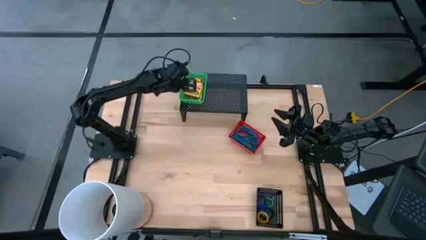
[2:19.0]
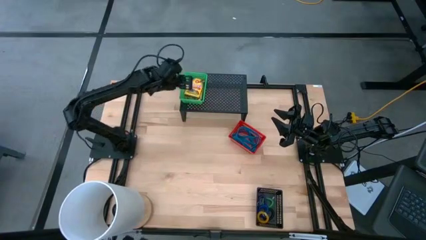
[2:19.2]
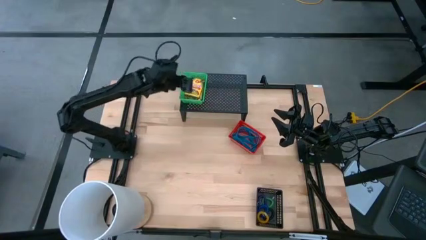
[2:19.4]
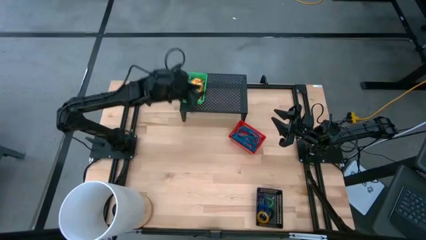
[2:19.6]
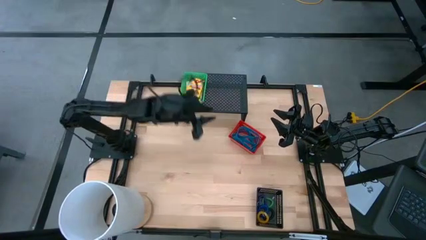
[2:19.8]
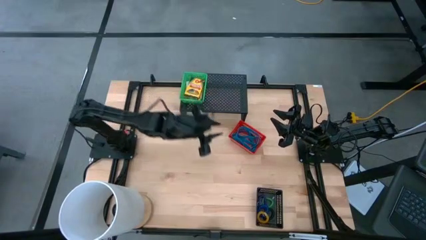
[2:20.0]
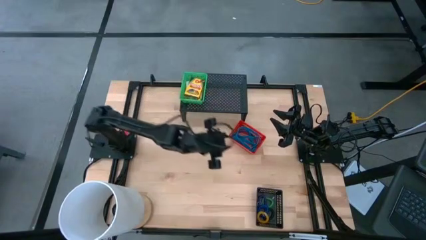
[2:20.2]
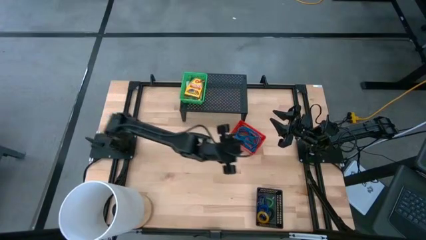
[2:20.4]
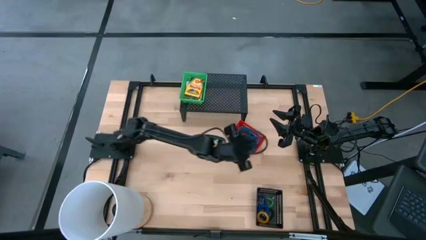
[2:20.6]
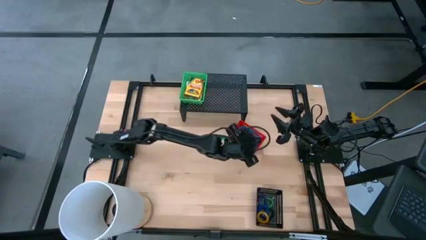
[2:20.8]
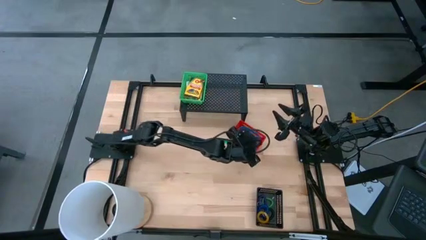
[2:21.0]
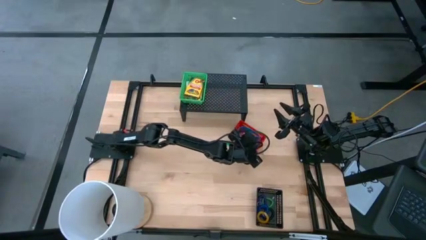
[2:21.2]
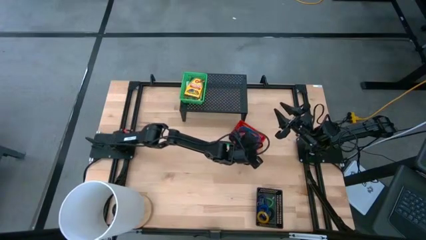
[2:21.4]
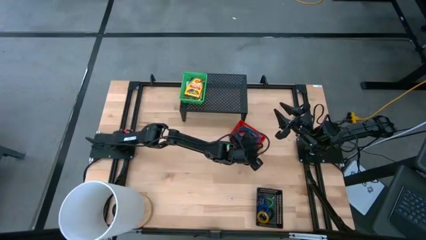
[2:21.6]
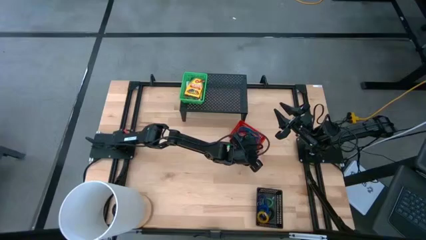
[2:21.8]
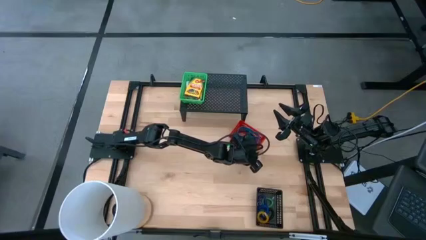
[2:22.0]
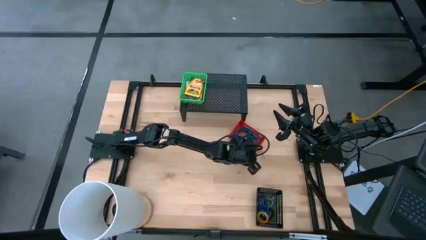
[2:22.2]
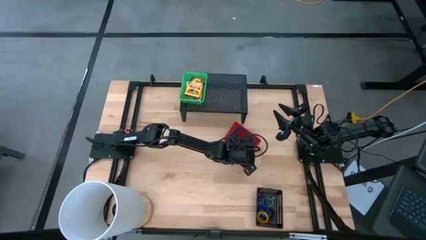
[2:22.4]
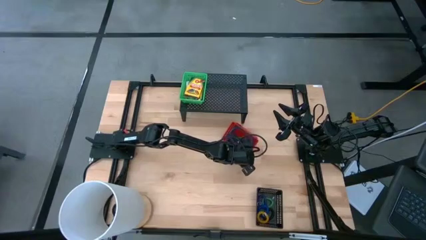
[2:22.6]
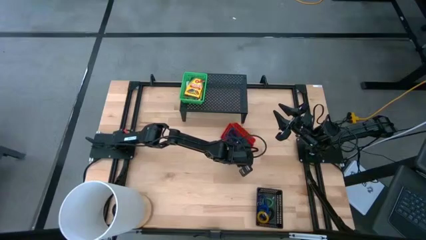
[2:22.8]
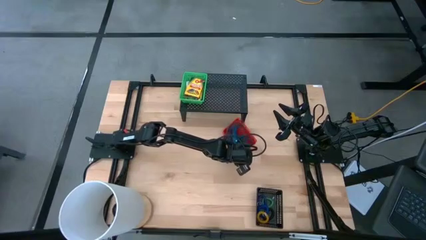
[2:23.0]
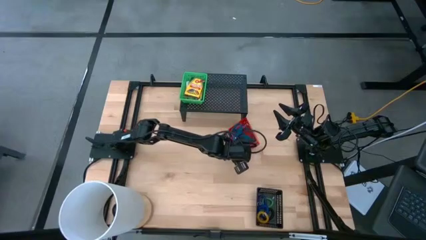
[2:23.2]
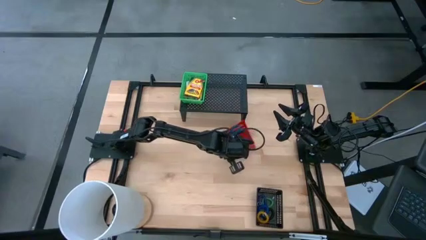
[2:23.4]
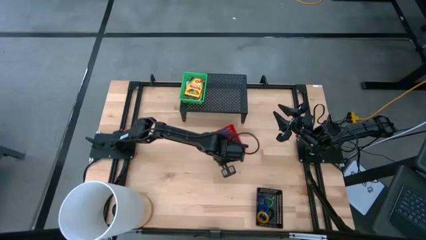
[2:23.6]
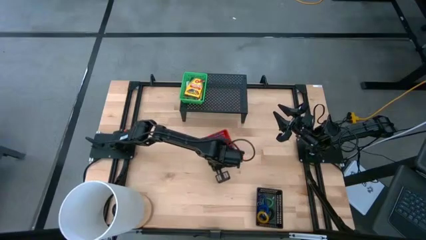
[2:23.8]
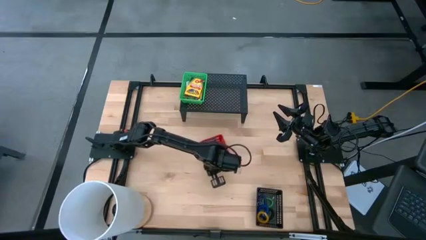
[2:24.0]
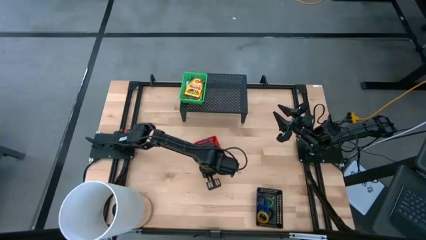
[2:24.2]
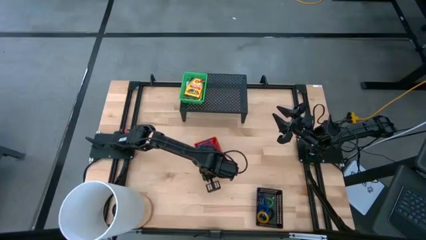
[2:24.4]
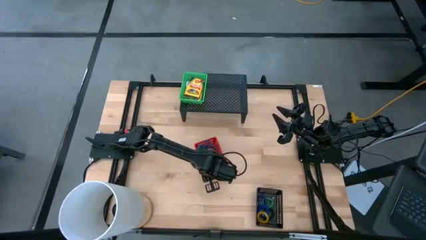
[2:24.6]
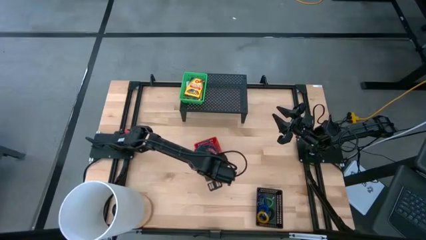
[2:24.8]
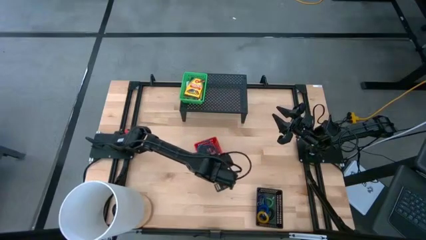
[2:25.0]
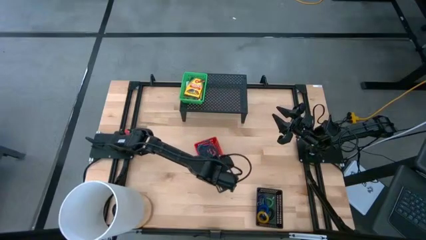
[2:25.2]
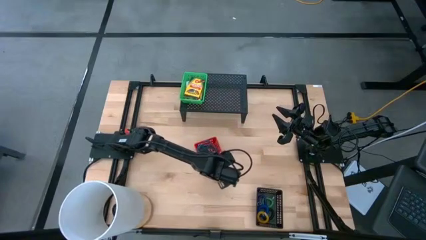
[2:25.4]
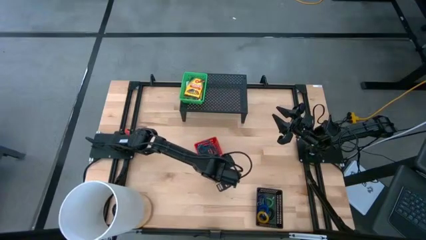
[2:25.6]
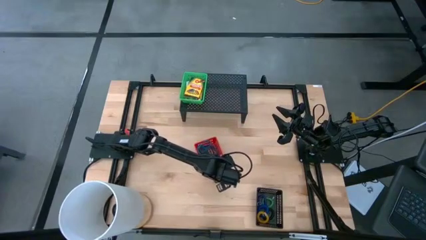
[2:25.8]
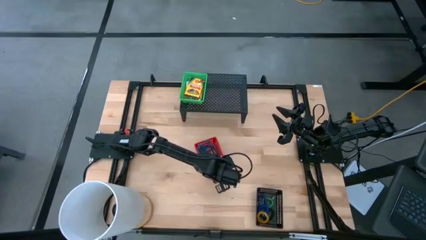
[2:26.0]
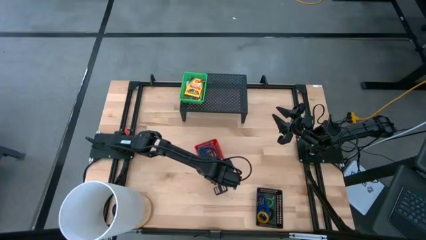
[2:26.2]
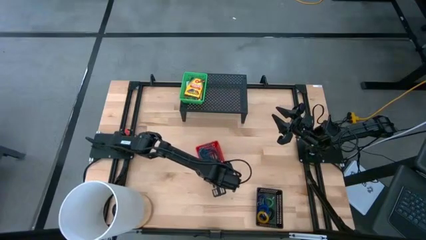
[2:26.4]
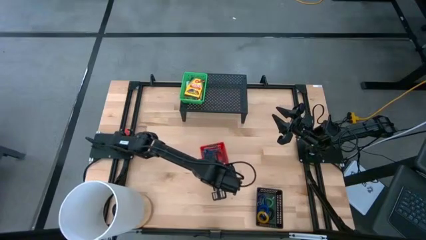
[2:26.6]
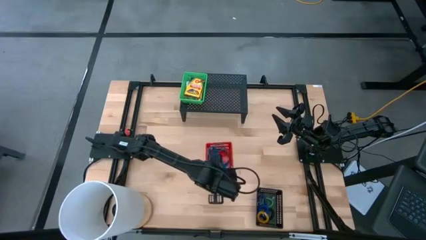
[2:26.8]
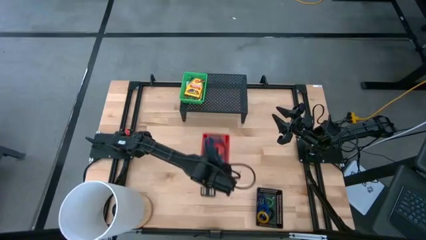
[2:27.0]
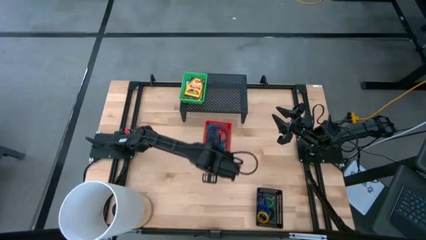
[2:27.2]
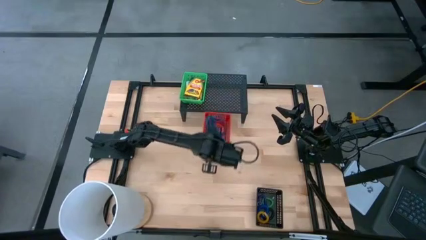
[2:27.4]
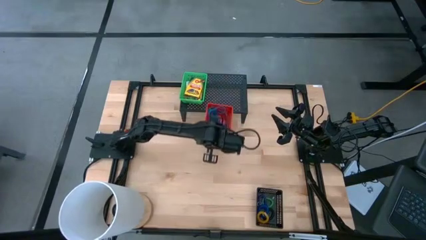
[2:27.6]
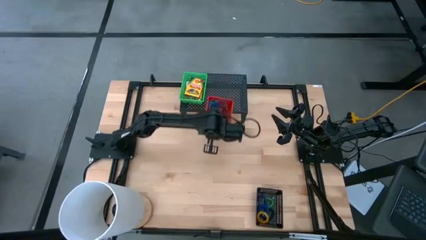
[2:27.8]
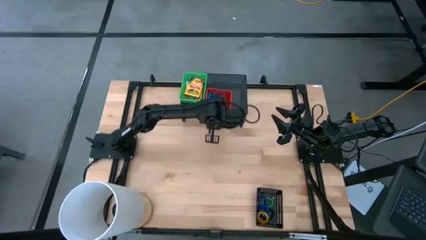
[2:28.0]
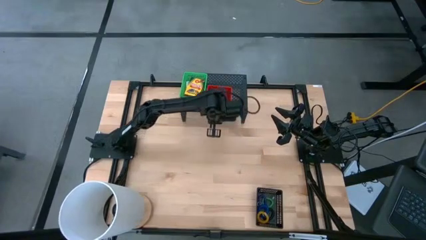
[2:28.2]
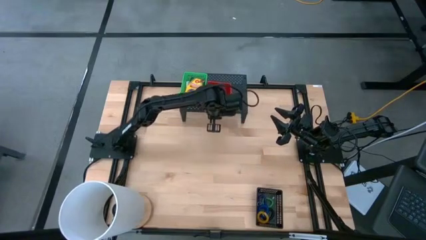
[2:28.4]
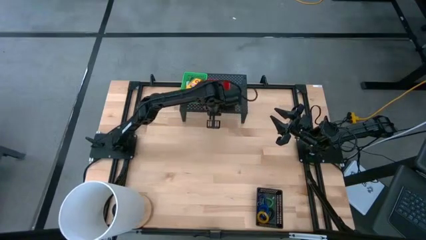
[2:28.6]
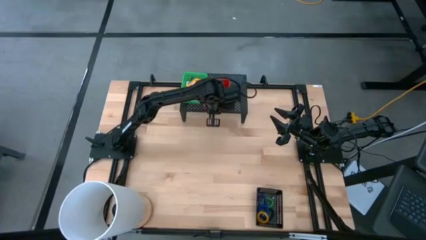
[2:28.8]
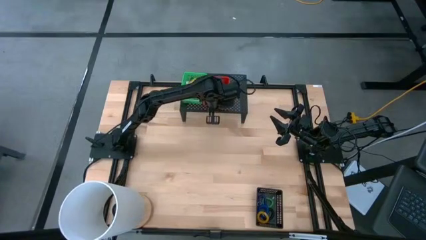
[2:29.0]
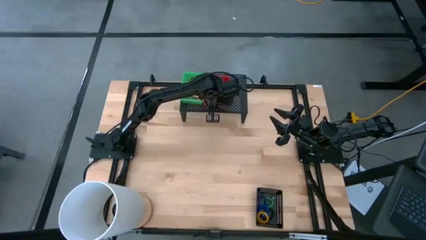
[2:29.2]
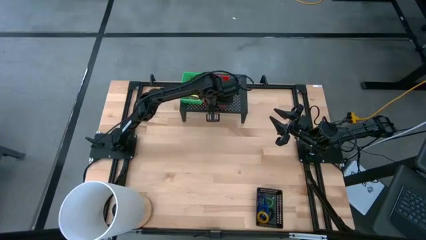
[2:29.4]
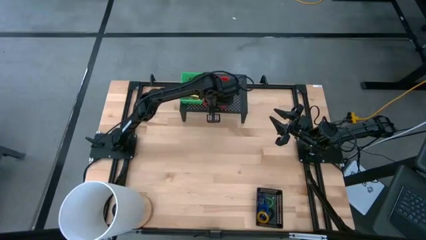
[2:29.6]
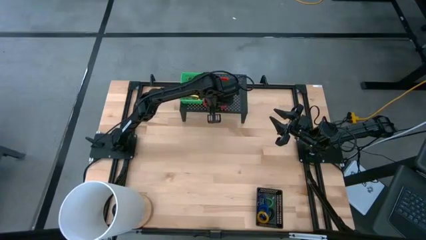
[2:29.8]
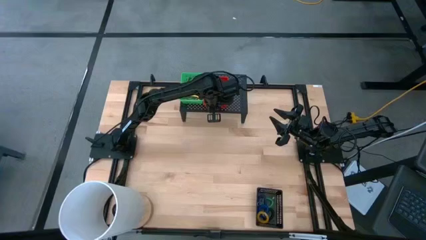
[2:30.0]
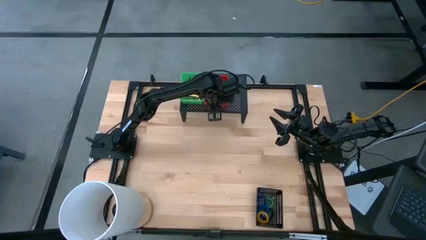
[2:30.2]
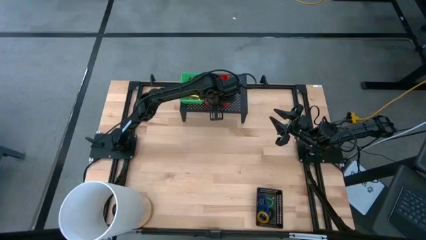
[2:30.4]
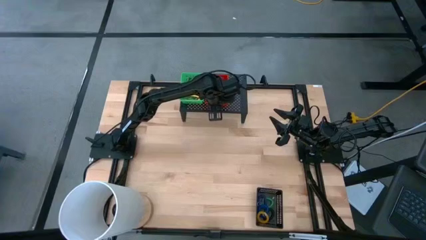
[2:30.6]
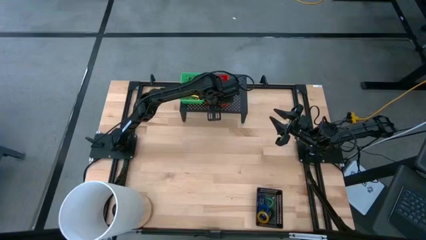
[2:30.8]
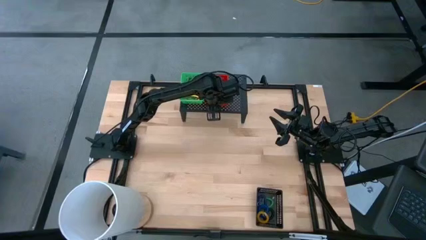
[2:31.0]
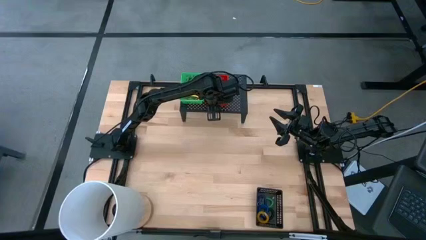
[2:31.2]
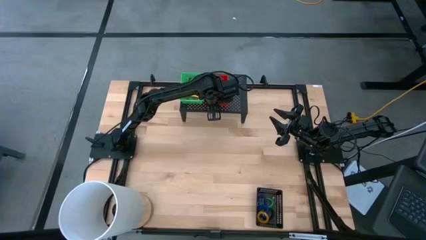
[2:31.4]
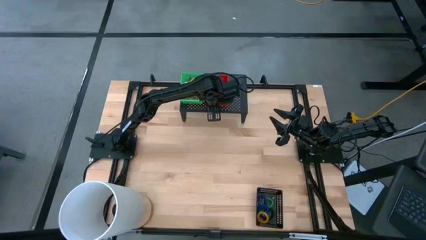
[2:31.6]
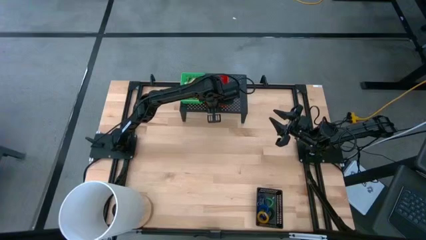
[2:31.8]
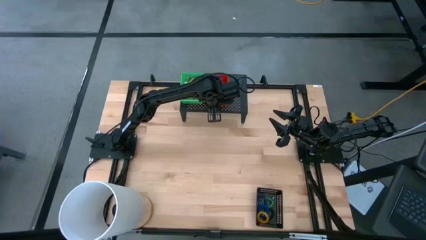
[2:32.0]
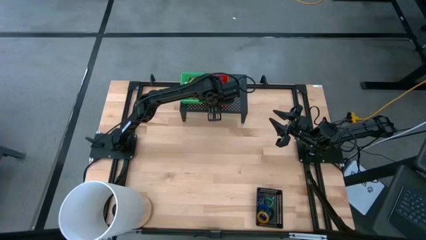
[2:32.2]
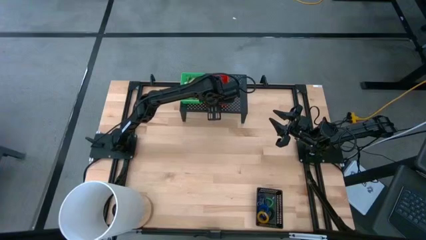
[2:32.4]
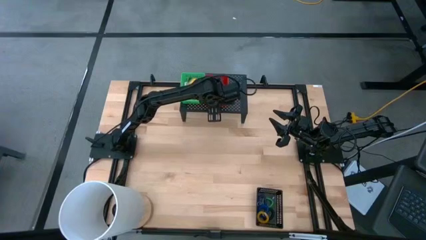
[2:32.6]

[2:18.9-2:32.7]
Task: Pick & Place Office Desk Supplies
Put the red bin on the shelf
